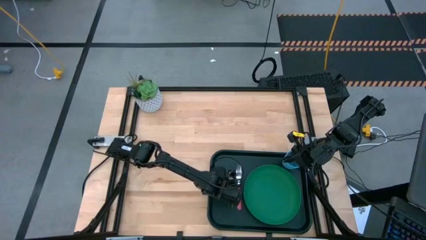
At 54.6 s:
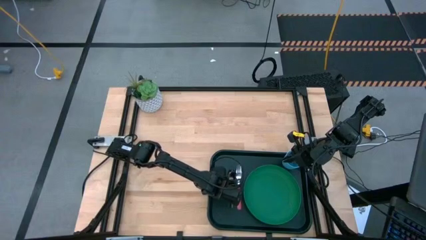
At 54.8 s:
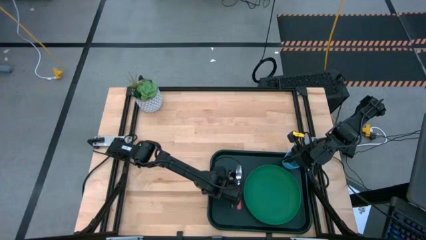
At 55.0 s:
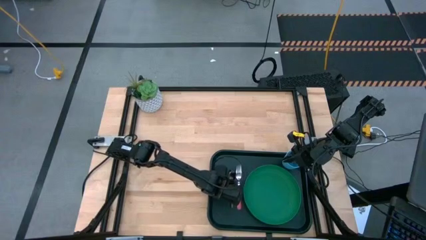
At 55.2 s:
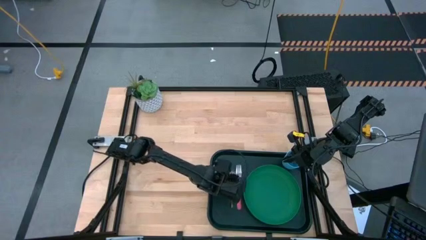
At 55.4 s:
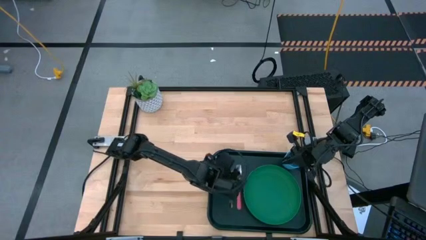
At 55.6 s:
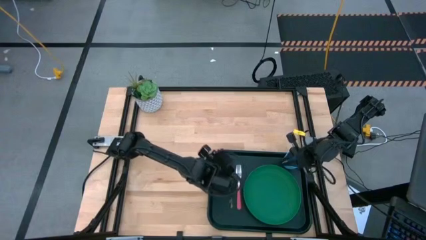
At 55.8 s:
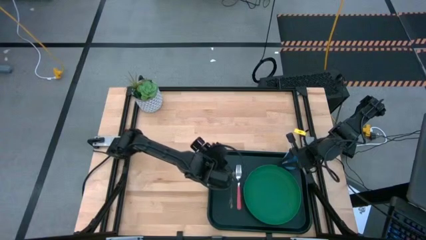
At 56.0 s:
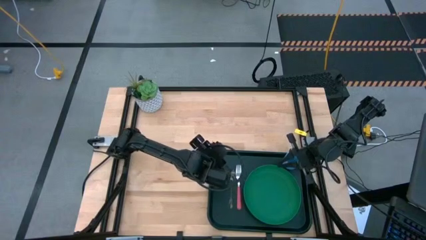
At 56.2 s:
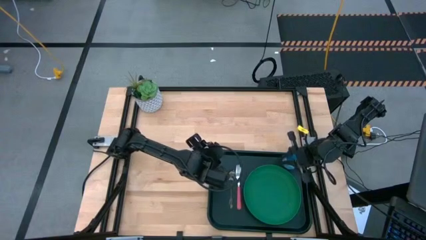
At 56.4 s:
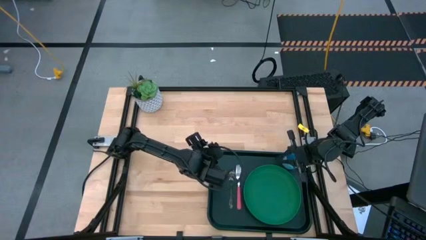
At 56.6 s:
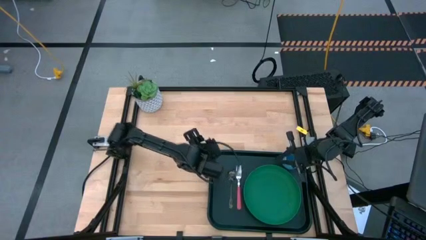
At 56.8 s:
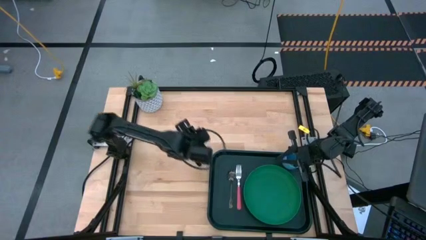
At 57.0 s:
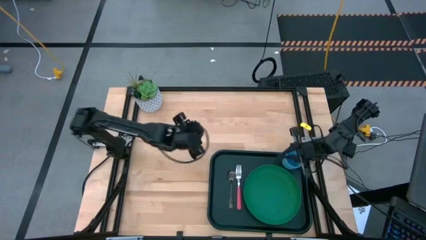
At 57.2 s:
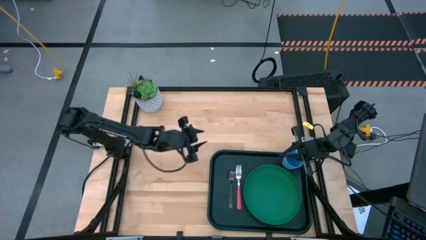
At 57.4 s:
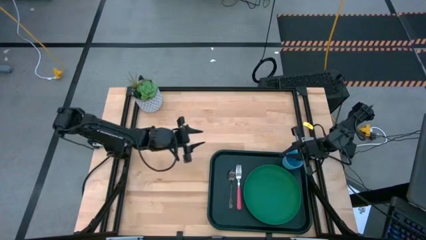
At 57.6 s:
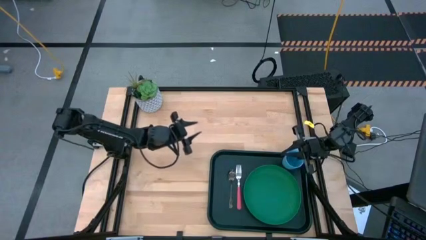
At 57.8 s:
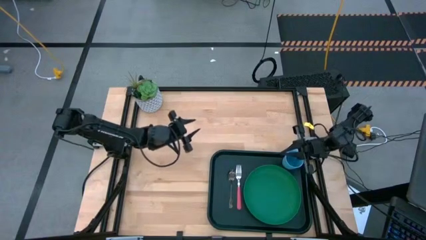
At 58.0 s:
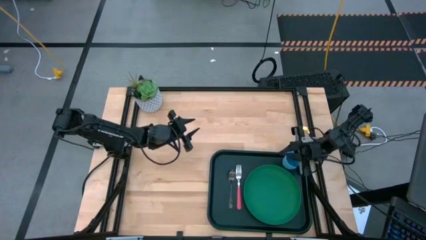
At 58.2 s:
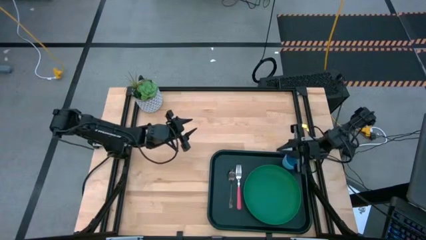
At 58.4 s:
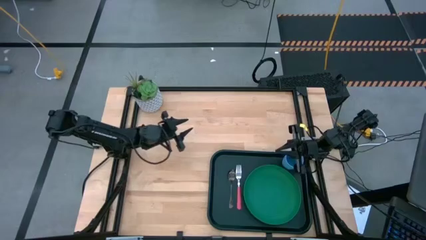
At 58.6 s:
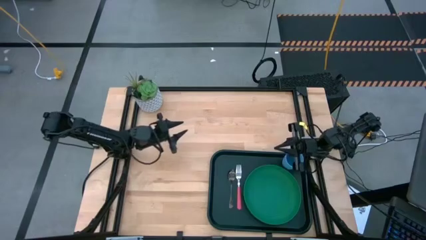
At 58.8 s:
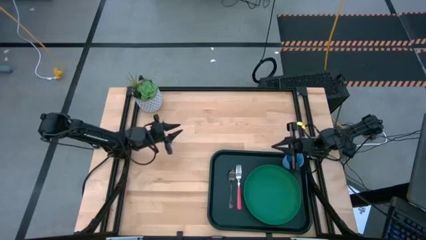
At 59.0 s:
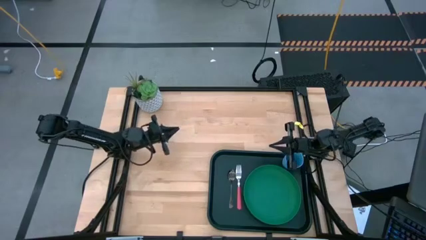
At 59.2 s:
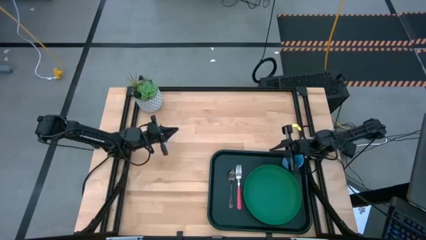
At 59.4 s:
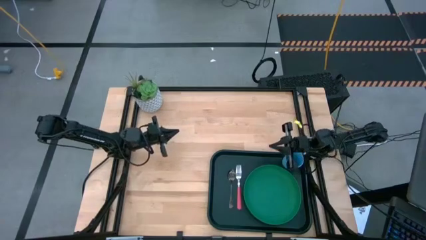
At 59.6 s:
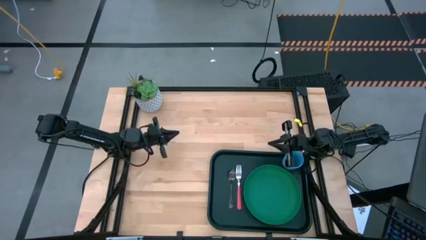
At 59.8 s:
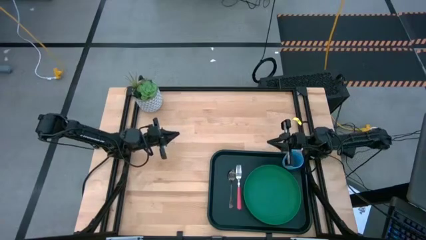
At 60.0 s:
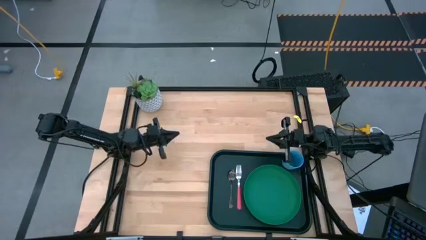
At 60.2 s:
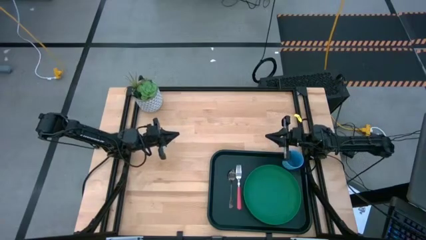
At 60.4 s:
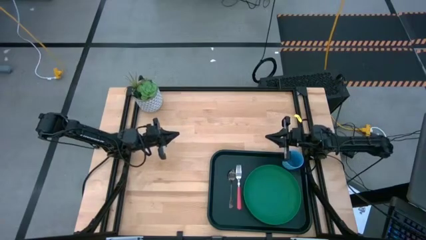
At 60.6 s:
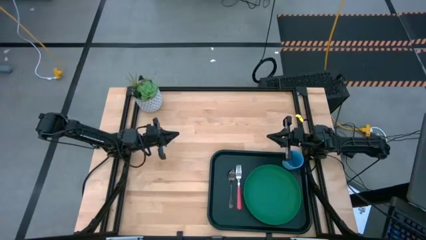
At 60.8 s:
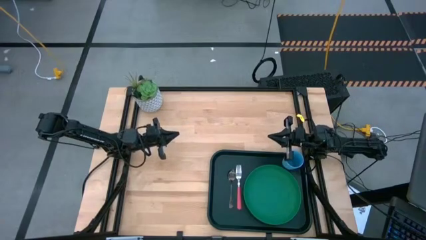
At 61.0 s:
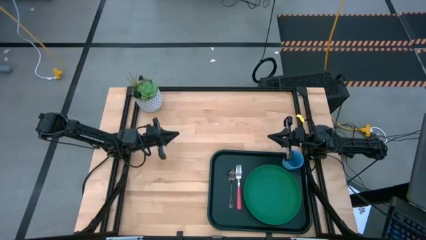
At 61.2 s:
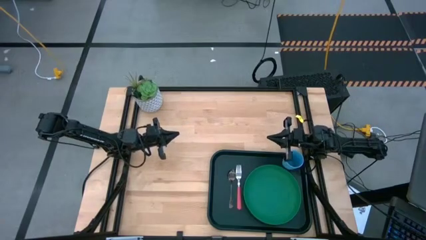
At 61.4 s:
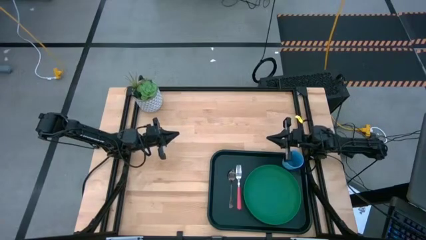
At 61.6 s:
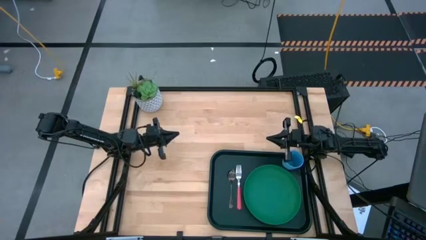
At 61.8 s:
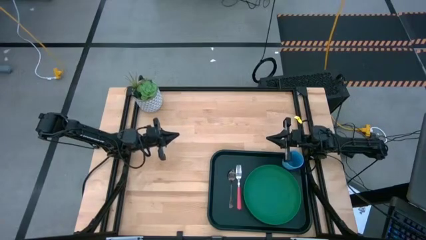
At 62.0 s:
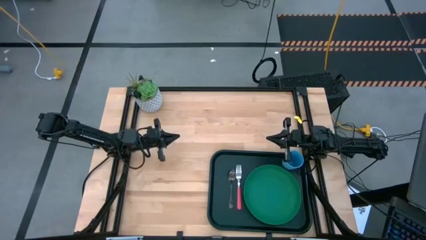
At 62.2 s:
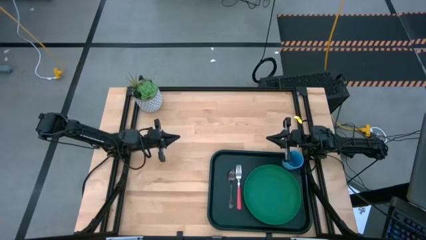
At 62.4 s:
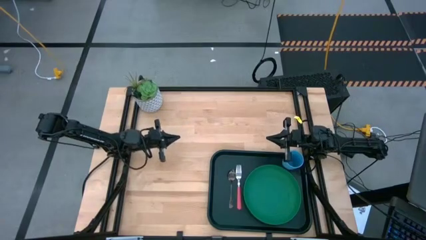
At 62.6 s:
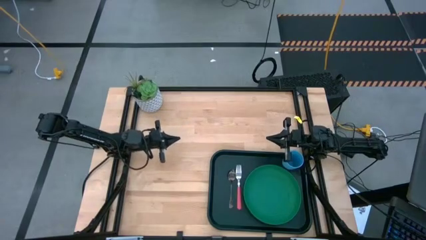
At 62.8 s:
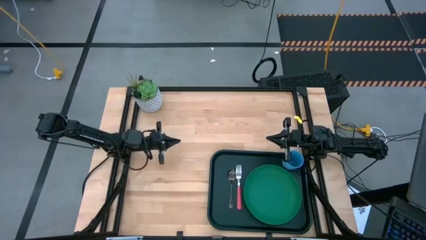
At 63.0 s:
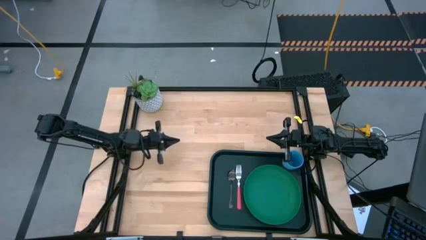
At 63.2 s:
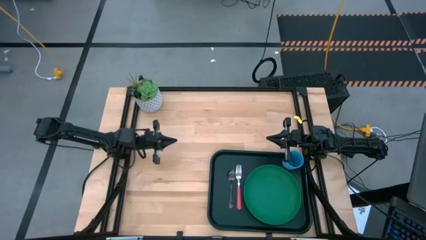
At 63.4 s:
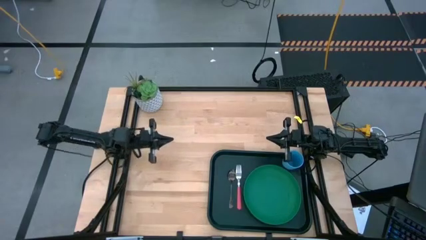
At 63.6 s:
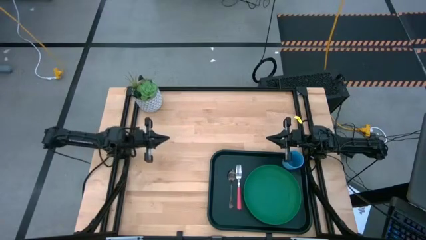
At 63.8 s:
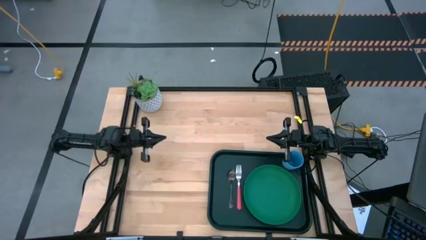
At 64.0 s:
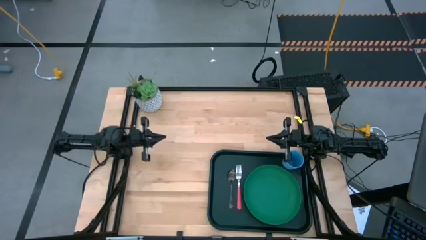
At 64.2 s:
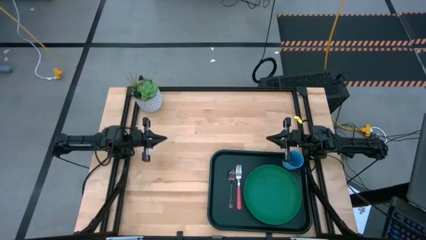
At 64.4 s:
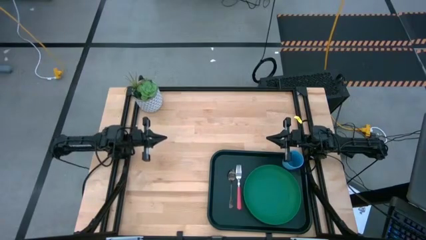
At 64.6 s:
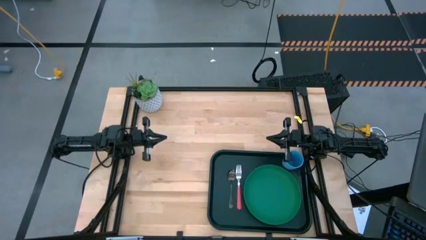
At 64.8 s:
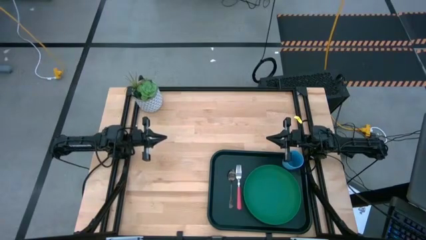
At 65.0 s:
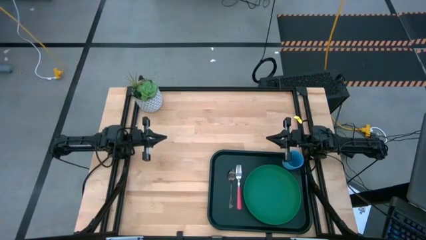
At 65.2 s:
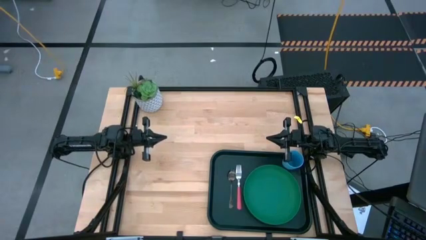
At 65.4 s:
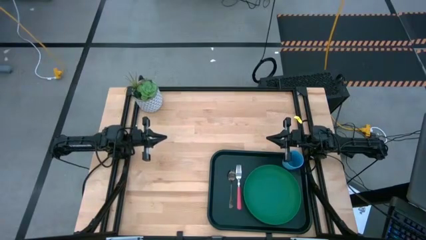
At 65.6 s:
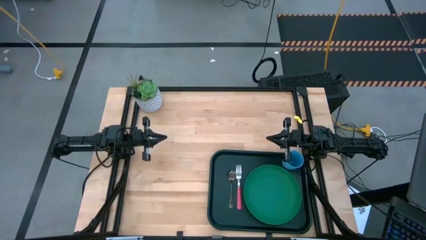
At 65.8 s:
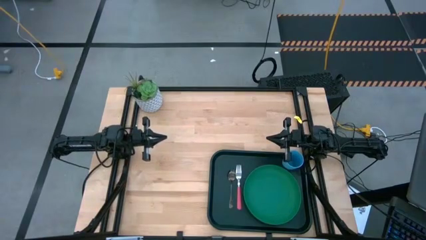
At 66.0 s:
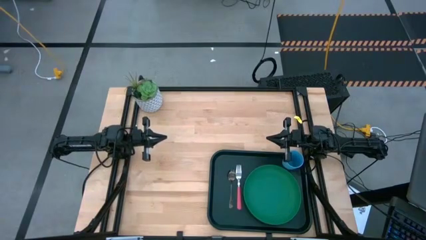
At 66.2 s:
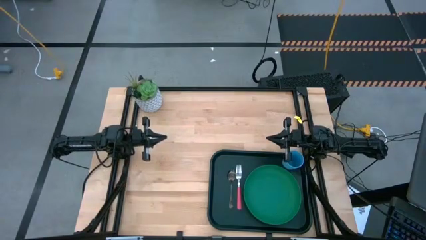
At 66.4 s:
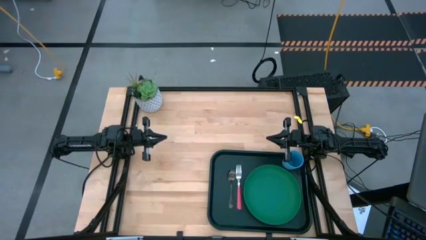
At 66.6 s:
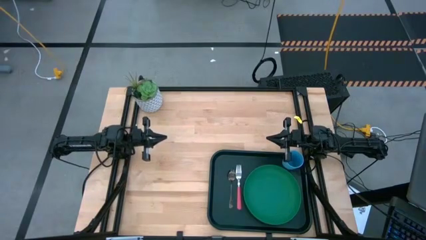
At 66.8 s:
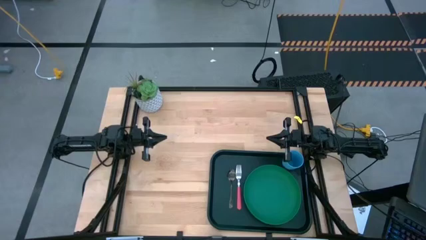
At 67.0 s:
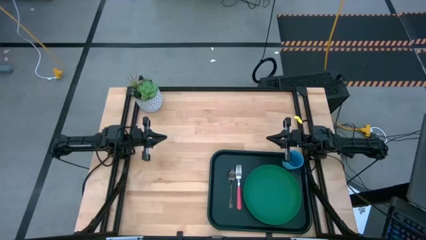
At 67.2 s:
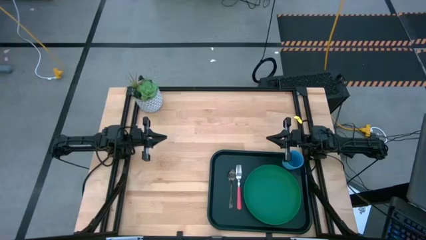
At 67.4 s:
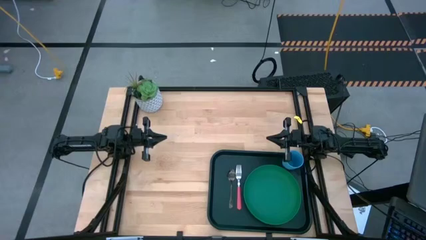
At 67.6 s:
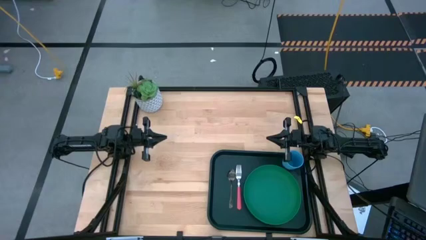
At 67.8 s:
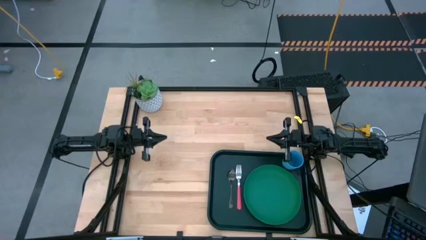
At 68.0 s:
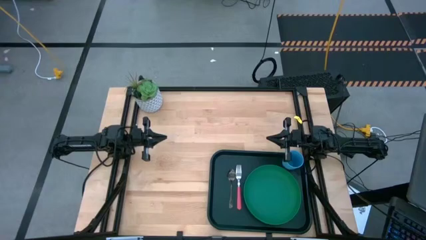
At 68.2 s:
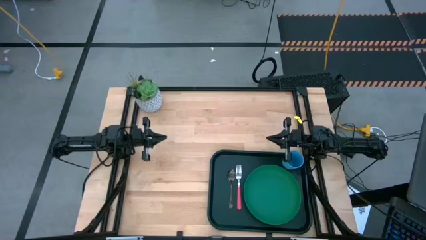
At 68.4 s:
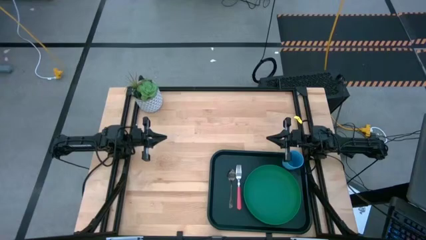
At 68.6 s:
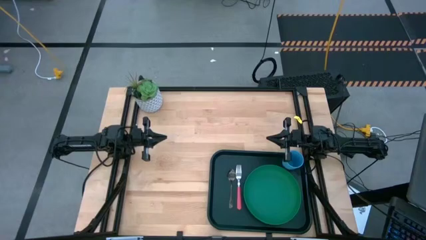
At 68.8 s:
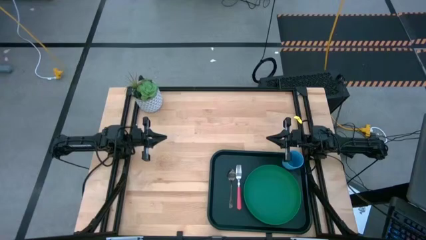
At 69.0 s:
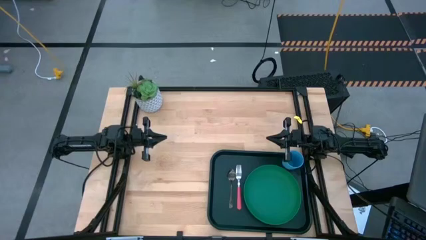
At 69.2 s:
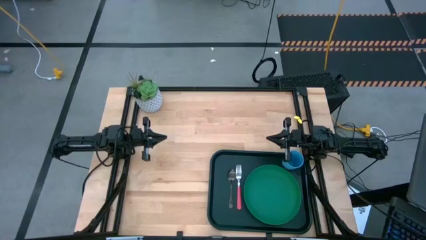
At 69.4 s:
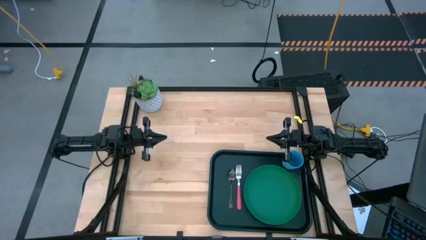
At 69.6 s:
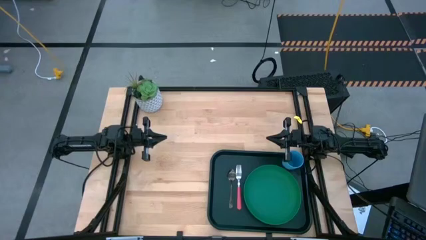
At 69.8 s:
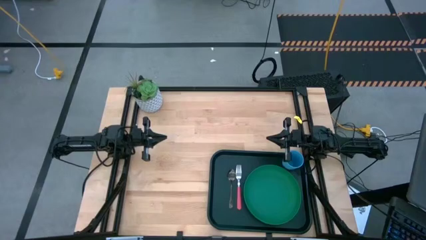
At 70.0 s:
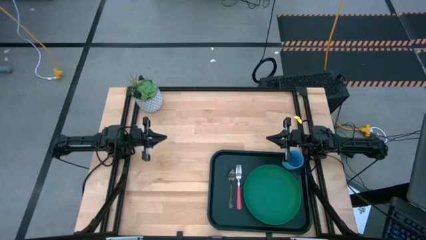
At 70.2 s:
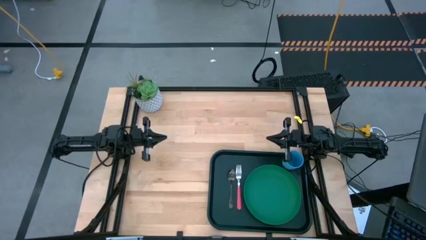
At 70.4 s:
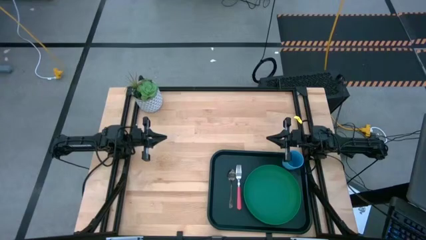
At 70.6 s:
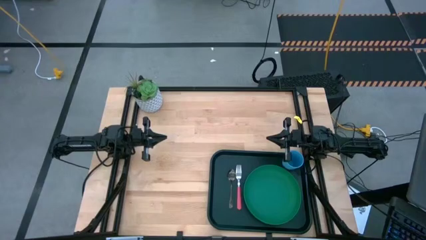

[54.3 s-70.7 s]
Task: Pick and place plate/cup/fork/spoon on tray
Return to Home Position

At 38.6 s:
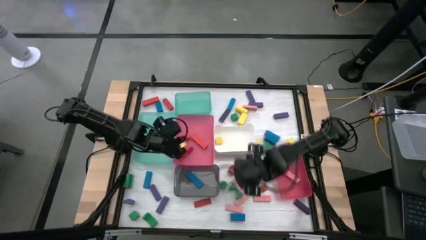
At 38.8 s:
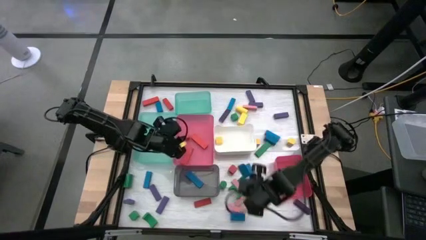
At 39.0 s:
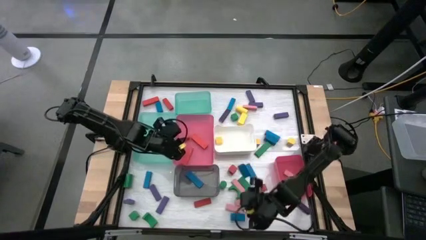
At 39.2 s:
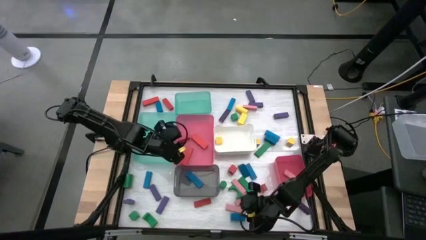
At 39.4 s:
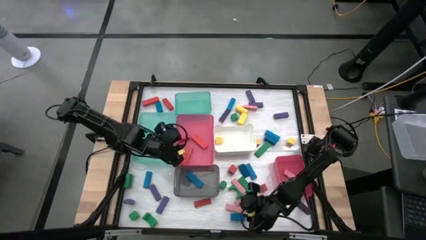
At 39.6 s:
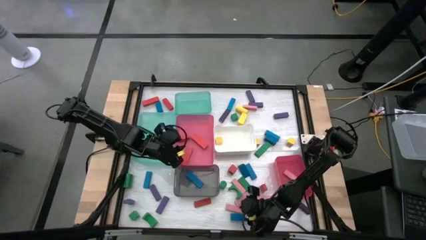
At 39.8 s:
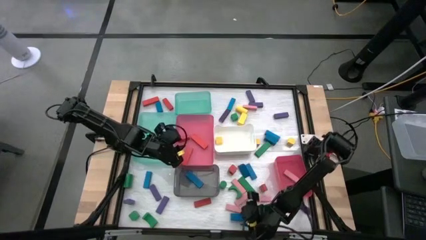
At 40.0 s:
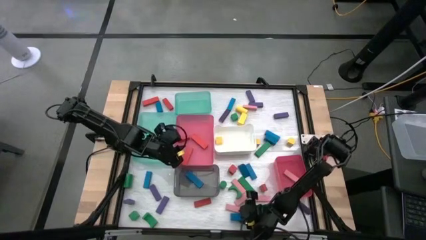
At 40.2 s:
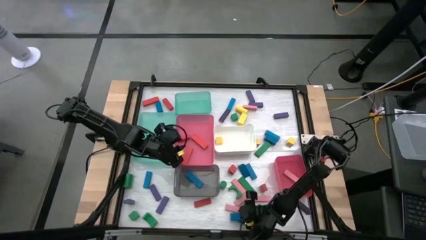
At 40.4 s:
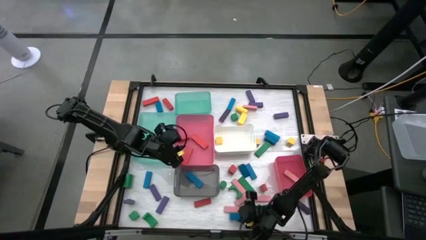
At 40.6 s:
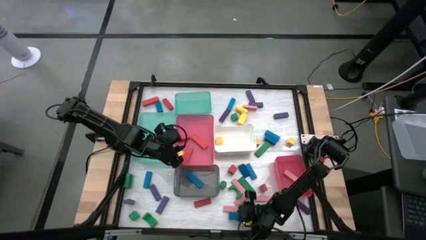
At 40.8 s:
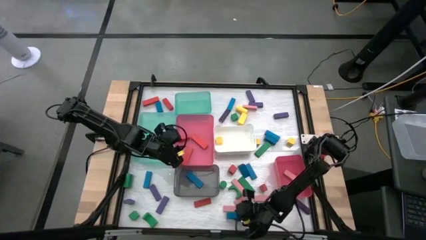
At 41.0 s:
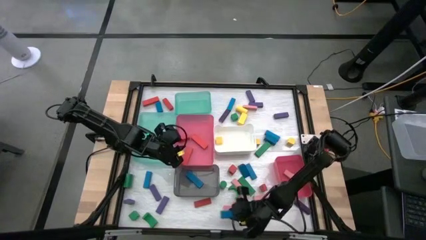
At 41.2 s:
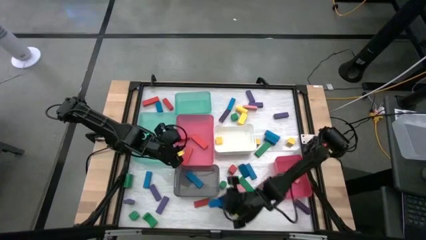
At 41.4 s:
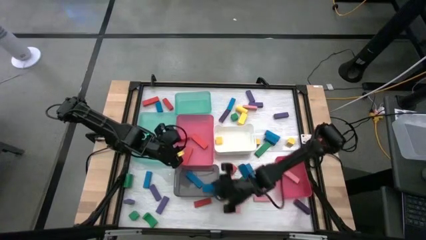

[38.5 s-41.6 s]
Task: Sort blocks
Put the blue block into the black bin
